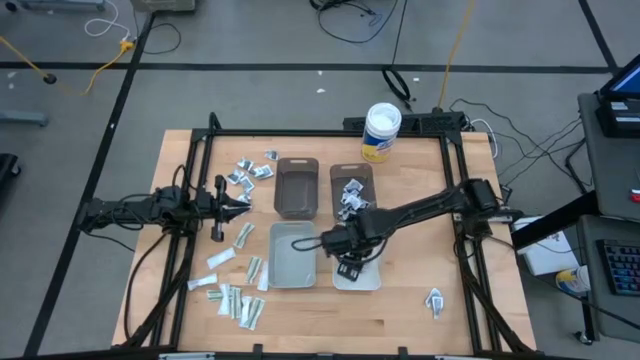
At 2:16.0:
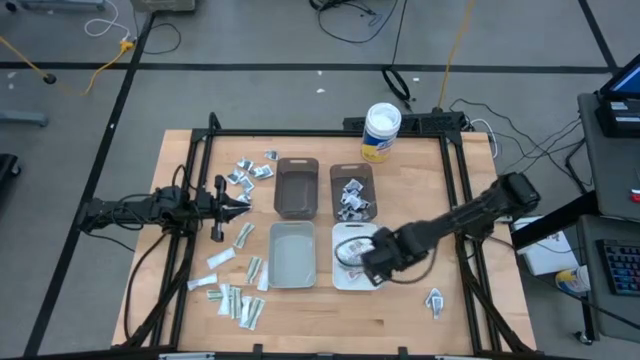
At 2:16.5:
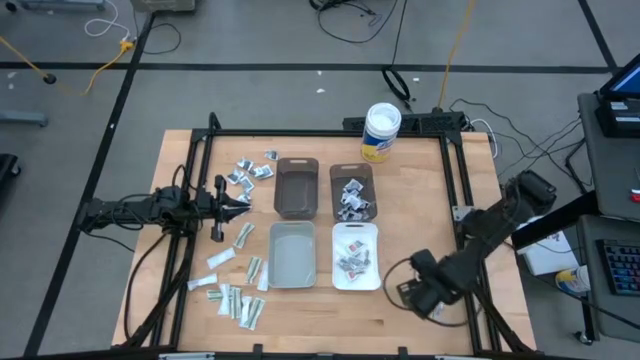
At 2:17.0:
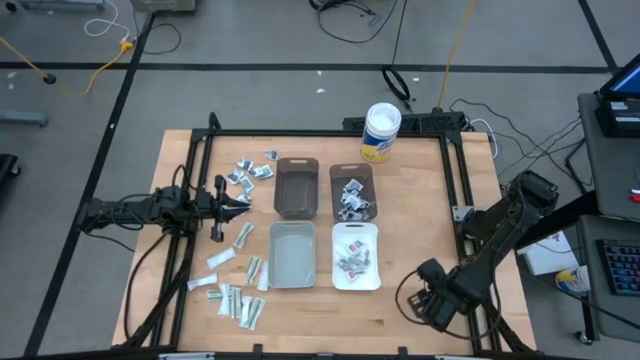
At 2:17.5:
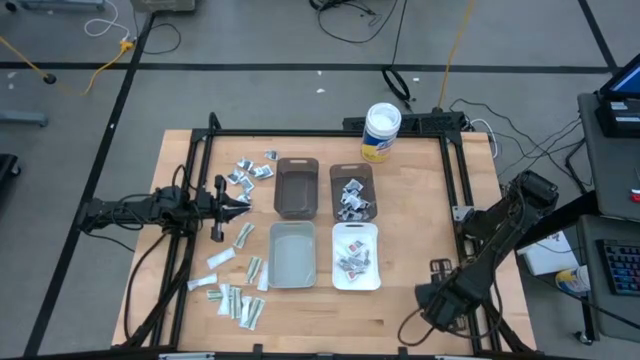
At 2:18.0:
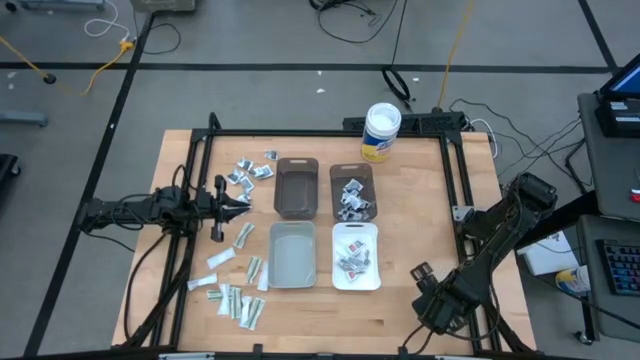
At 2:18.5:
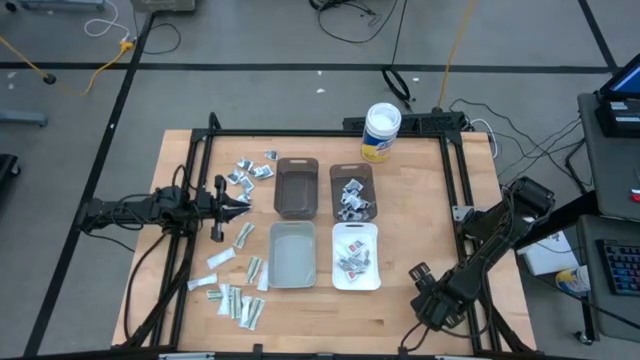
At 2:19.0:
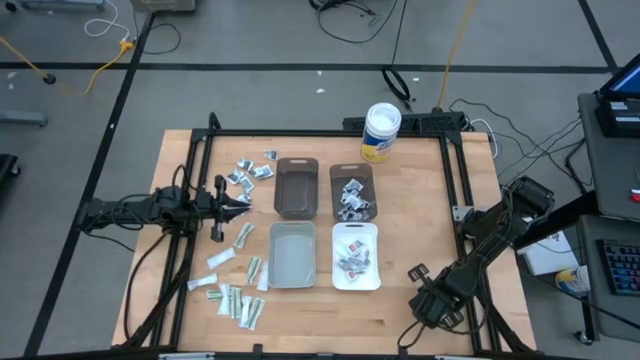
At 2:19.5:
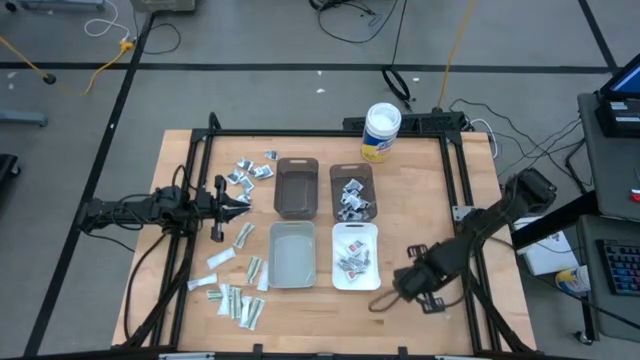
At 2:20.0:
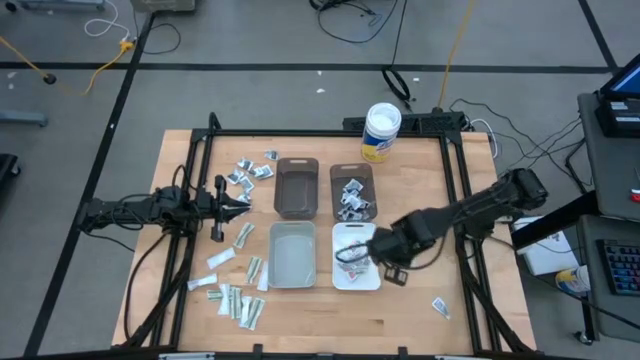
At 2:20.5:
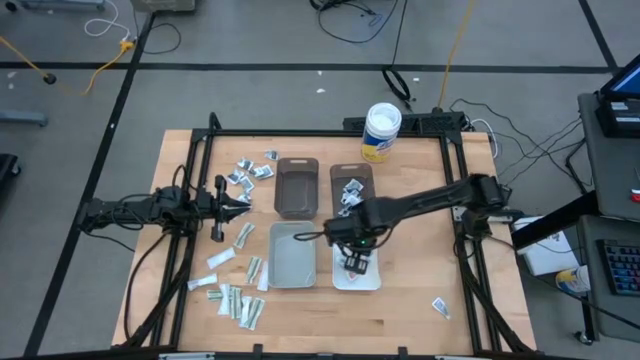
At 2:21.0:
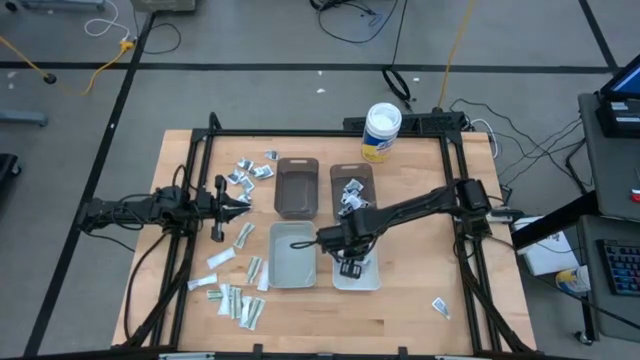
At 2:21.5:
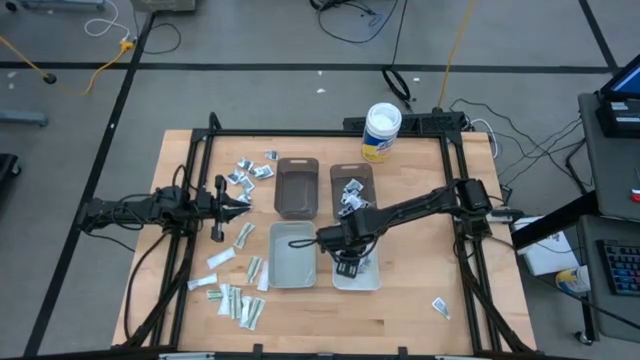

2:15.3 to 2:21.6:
Task: Pick & Place First Aid Supplies
Put the orange pad into the white bin

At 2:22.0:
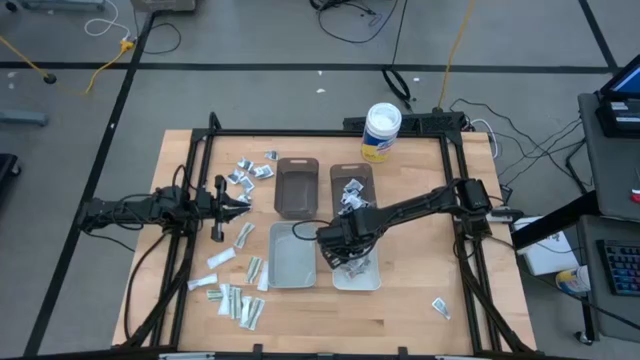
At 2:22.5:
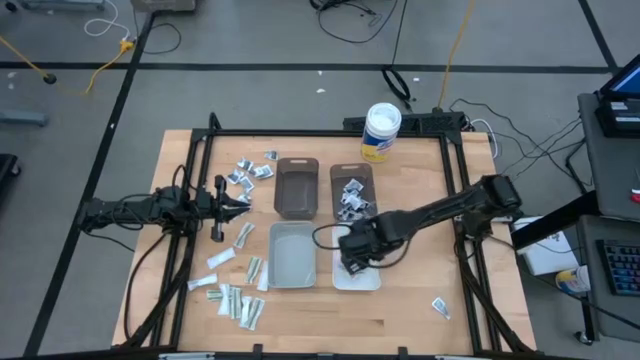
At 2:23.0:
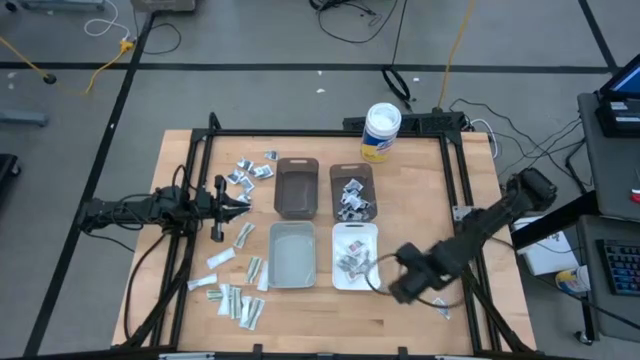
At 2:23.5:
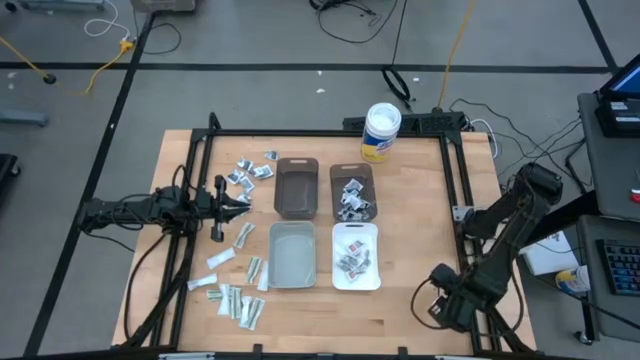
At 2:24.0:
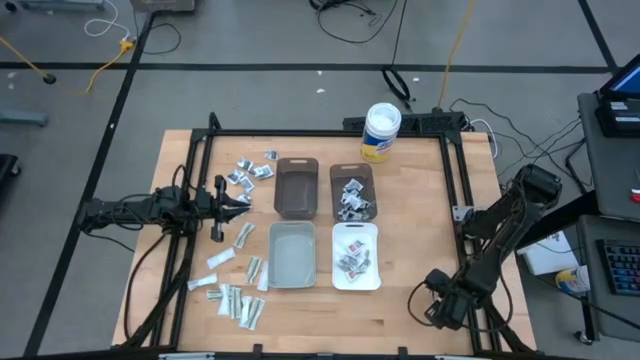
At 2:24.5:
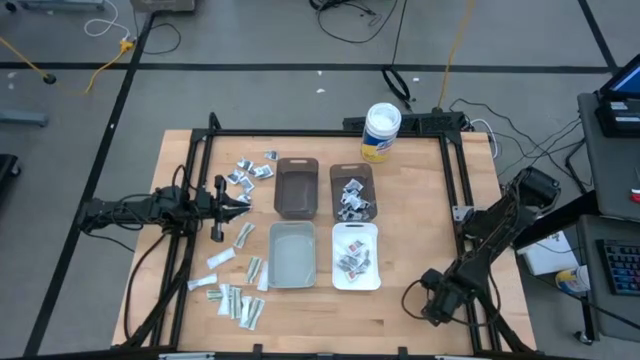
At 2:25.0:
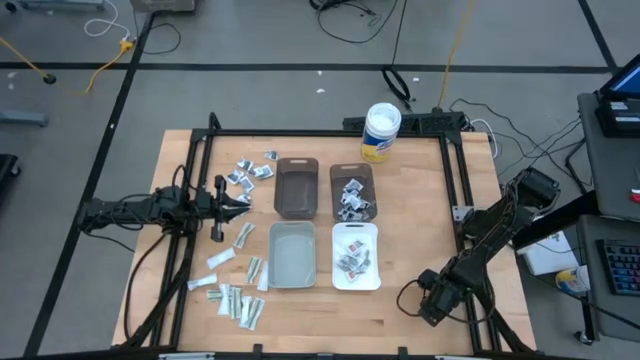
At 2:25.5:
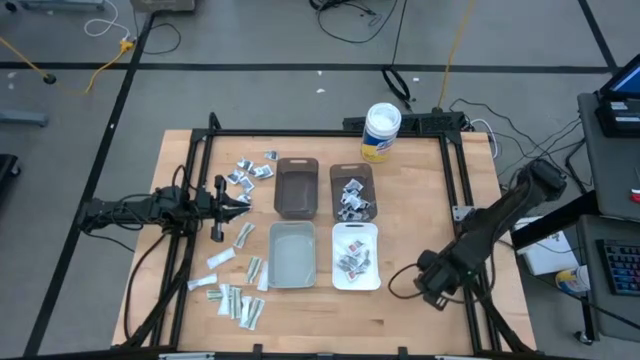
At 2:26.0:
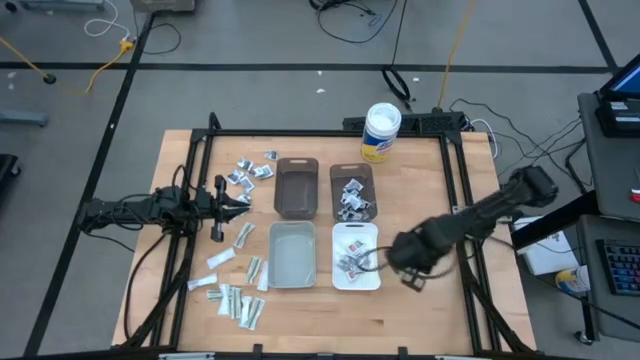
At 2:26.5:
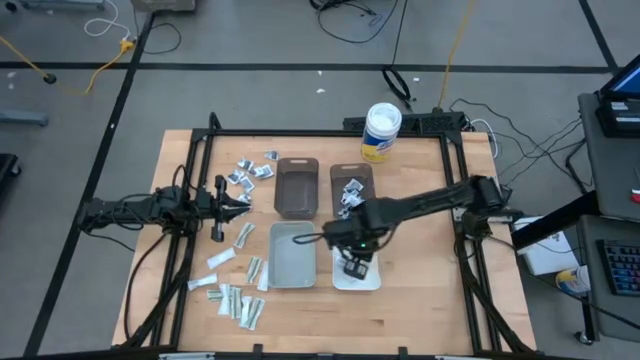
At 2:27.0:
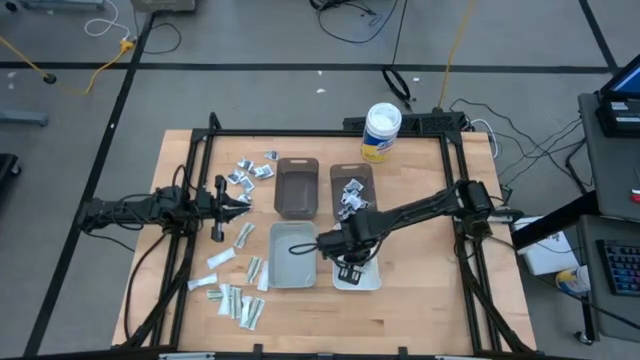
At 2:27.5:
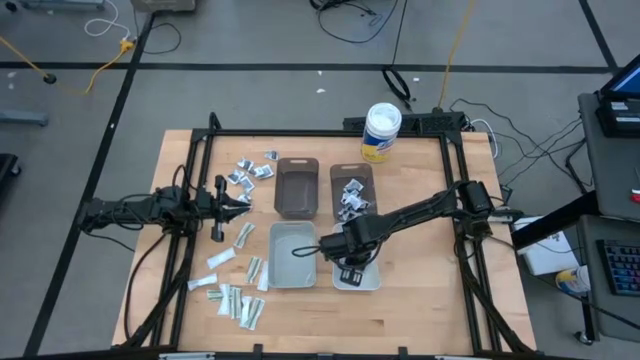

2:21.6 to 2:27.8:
Put the orange pad into the white bin

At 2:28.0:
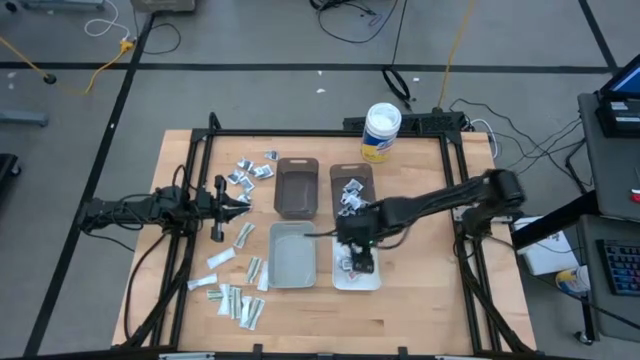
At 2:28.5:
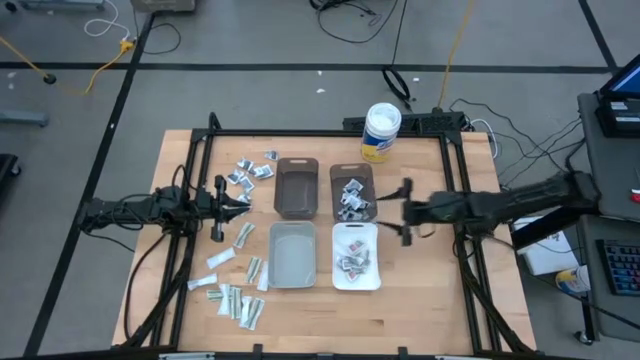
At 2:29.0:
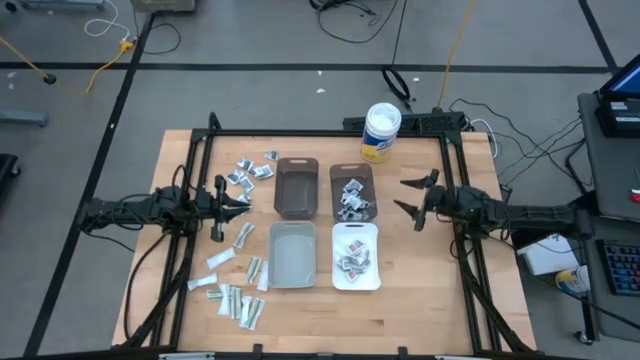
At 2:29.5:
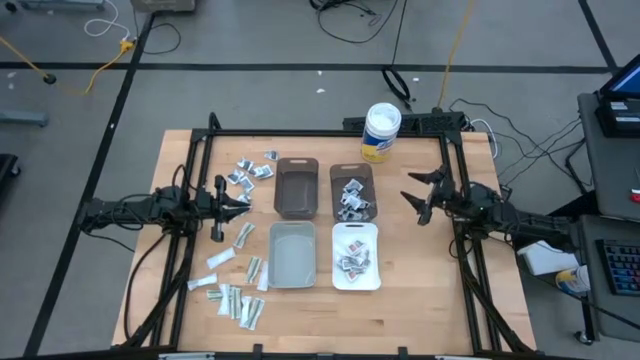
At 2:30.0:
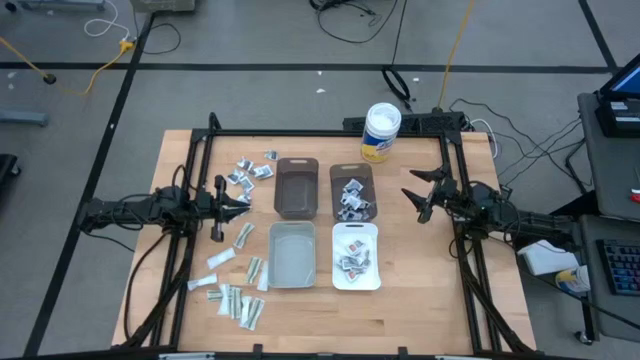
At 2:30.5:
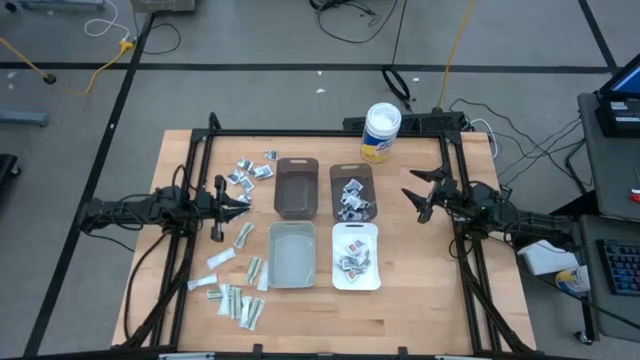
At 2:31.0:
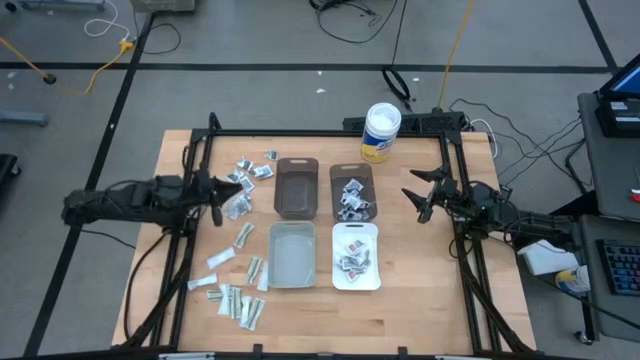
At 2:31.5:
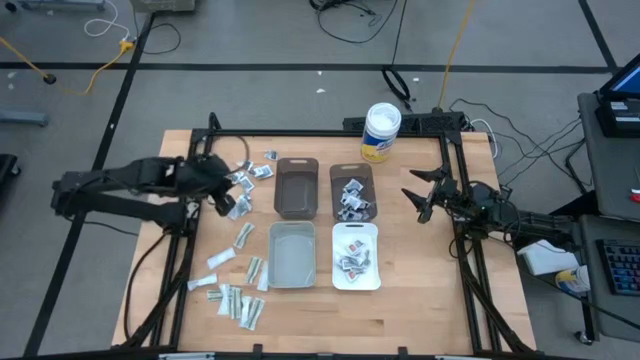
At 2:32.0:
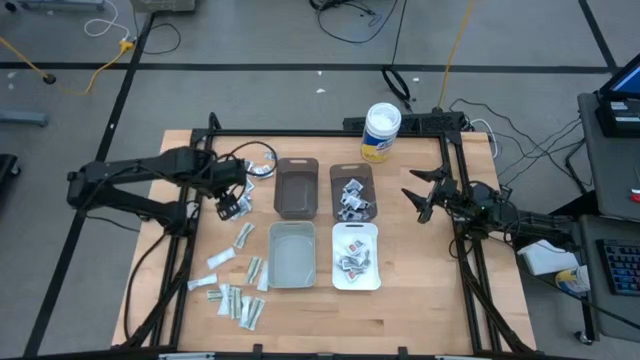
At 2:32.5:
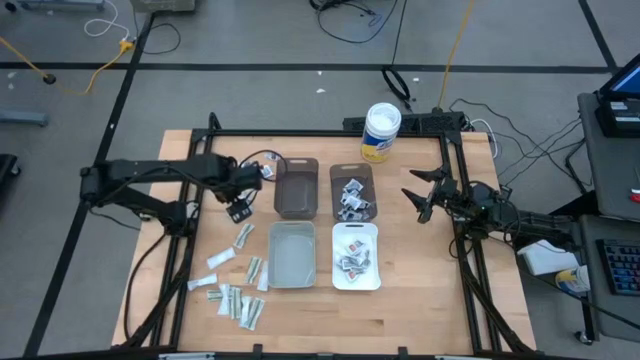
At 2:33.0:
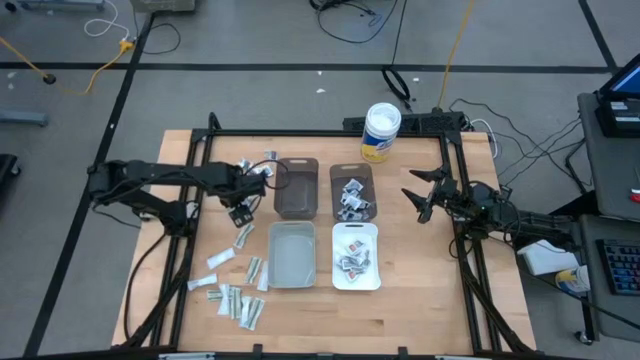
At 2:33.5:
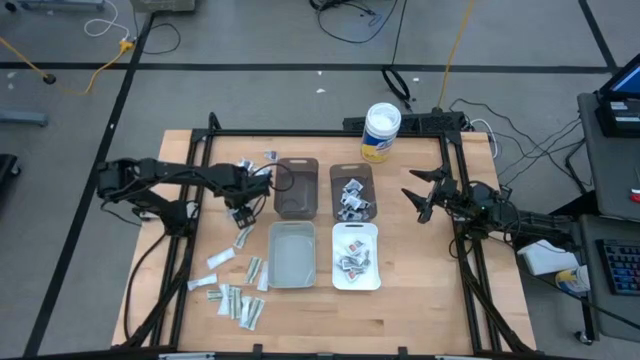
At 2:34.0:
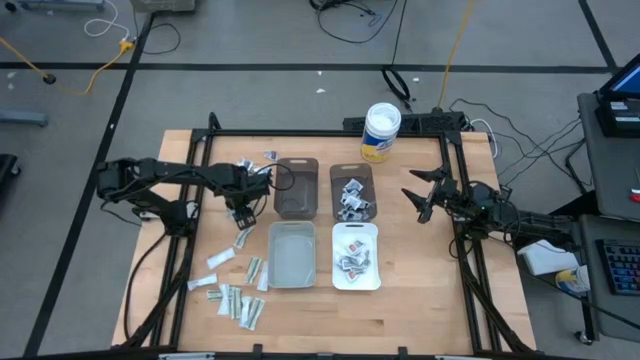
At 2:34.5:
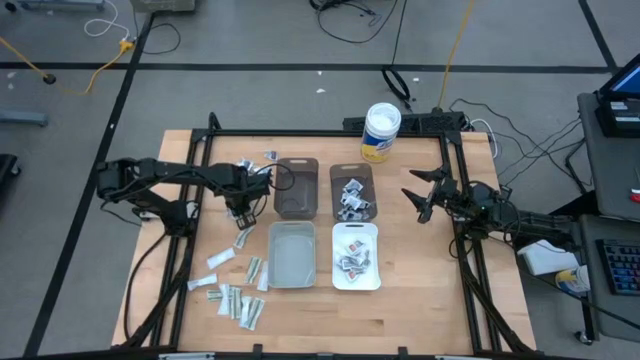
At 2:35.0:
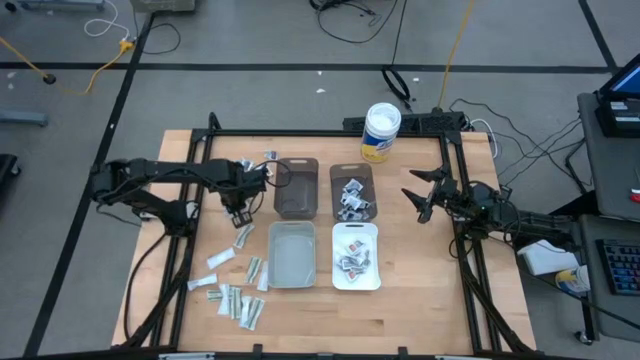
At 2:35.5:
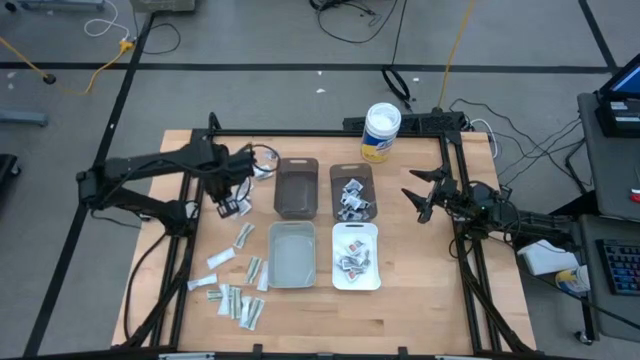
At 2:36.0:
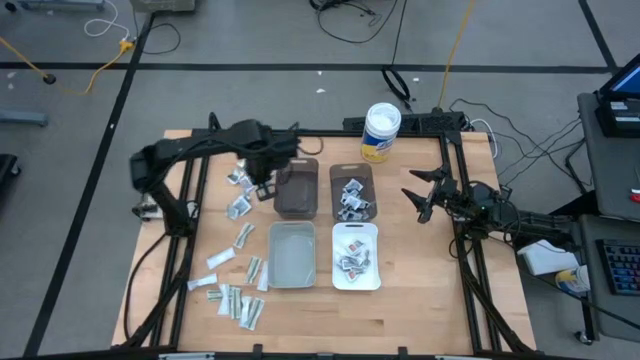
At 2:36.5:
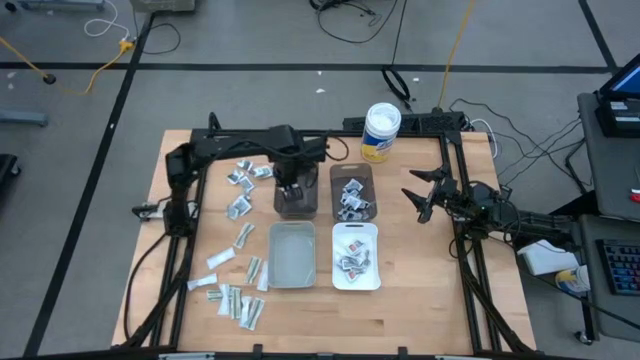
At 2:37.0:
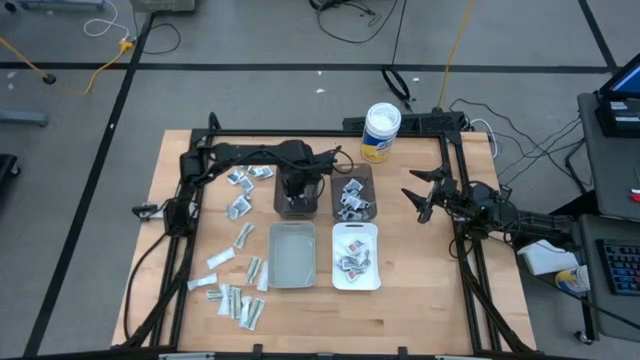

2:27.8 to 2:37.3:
Put the gray pad into the left black bin
